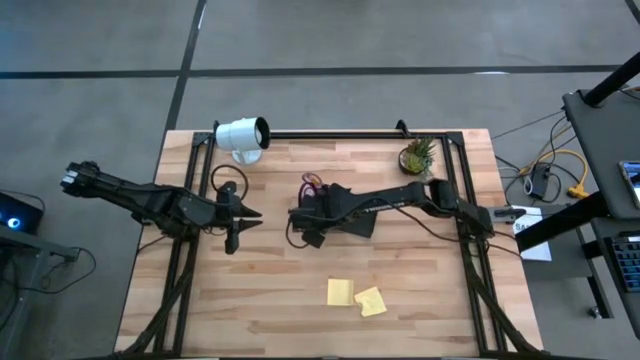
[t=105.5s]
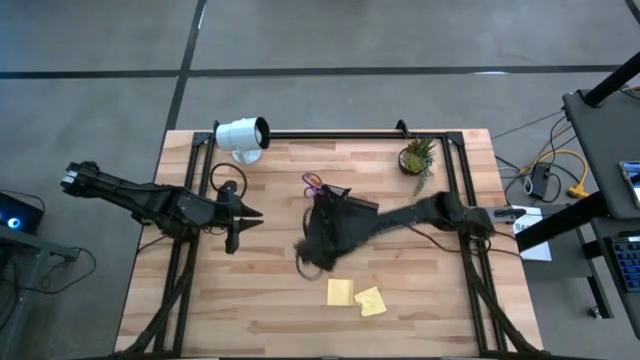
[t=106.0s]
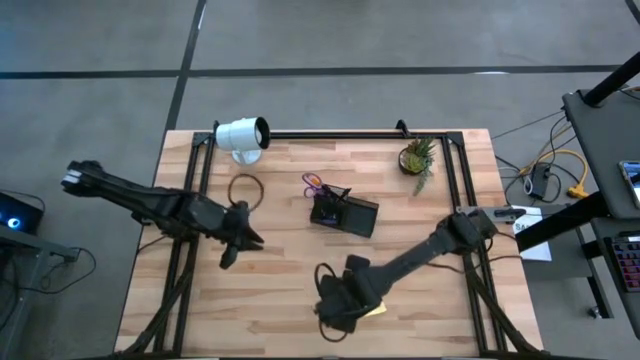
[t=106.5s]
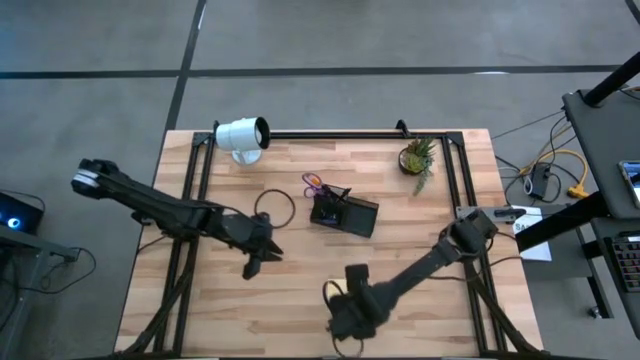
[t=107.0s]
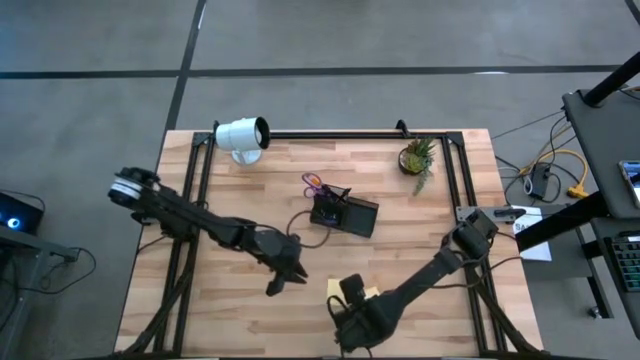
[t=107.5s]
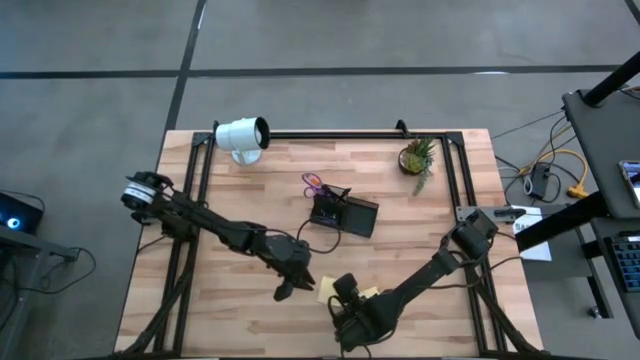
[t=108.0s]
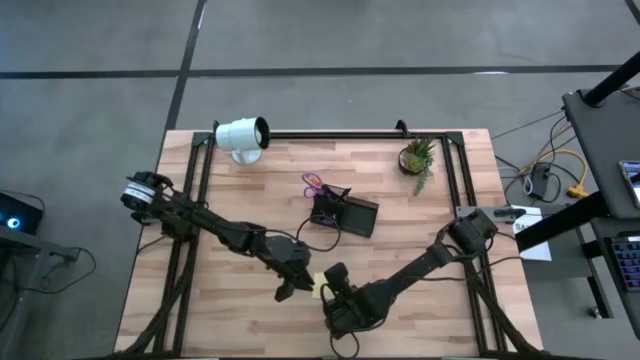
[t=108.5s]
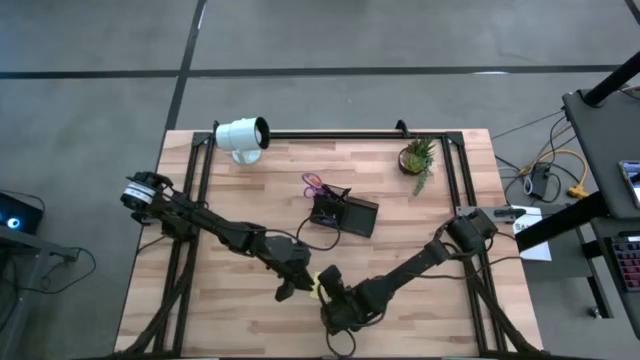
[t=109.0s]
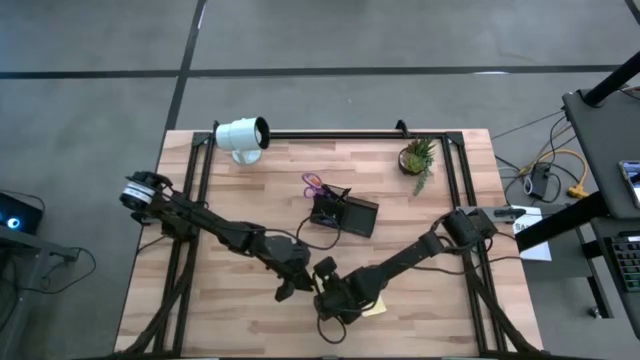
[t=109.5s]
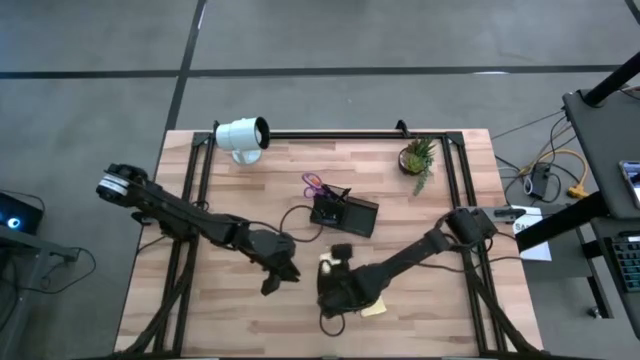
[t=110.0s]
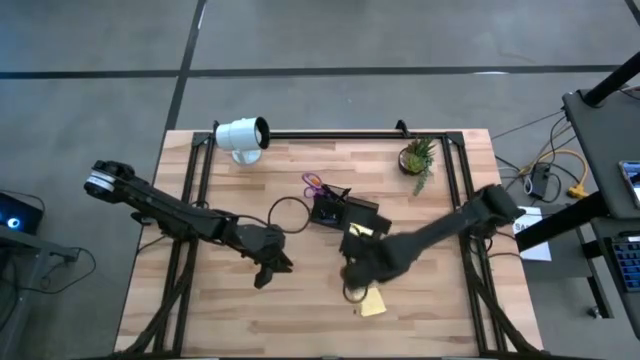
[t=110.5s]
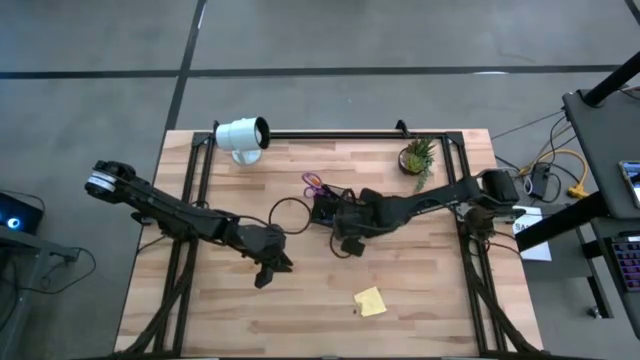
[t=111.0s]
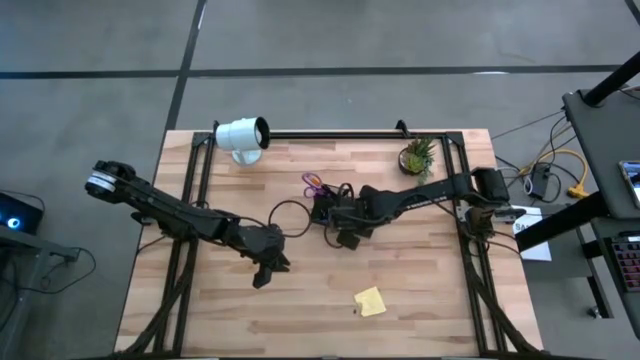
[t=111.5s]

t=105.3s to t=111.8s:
Task: Pick and place office supplies into organizer
Put the left yellow sticky notes into the black desk organizer

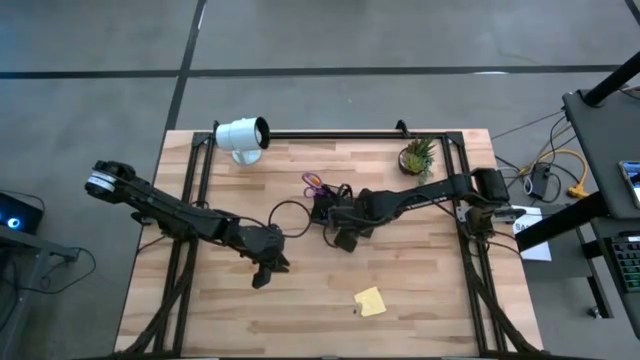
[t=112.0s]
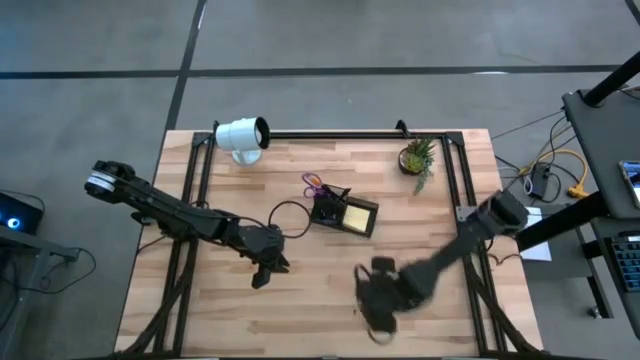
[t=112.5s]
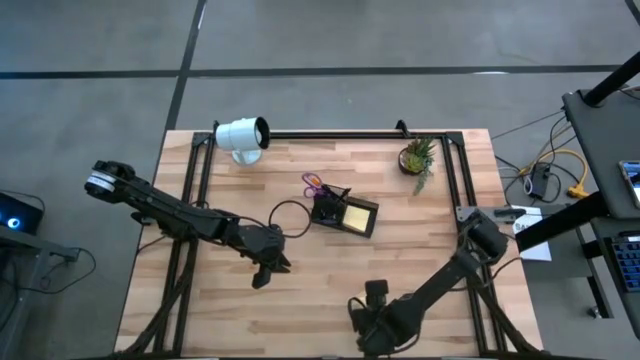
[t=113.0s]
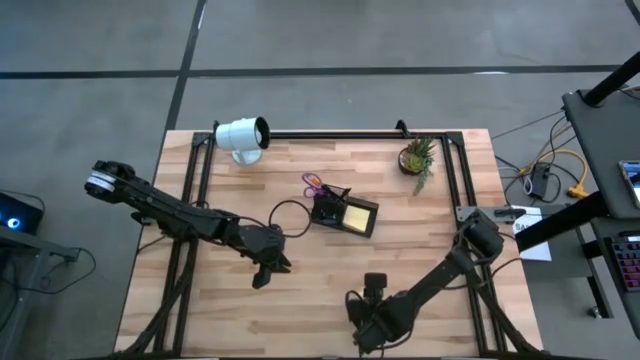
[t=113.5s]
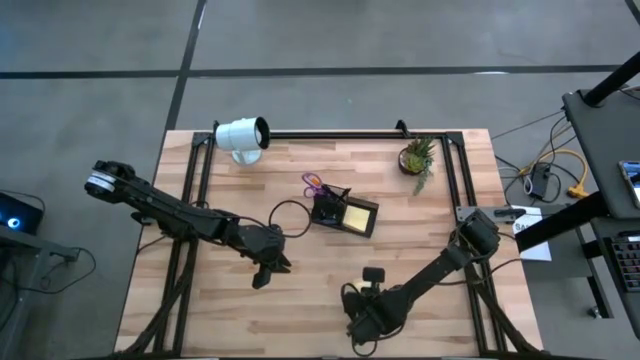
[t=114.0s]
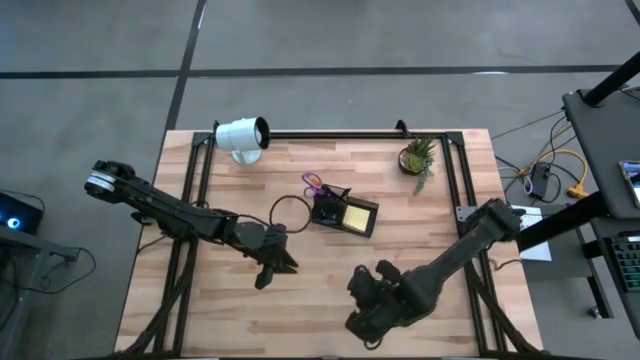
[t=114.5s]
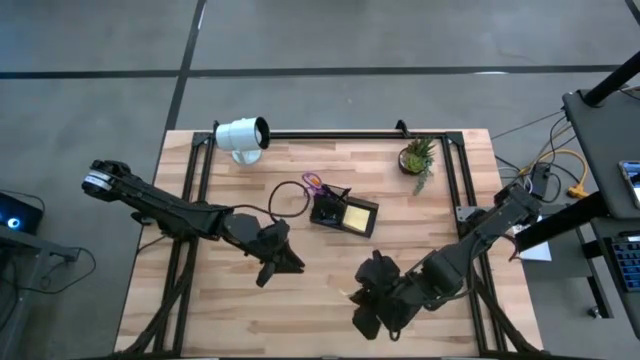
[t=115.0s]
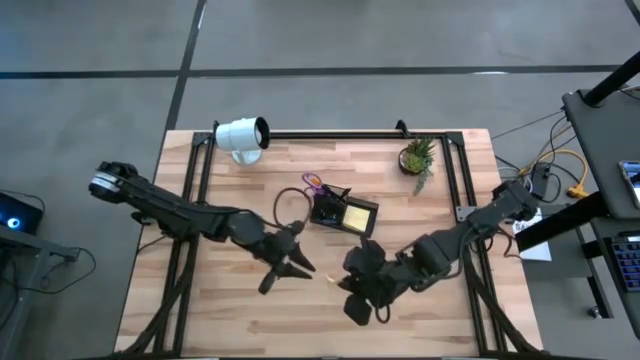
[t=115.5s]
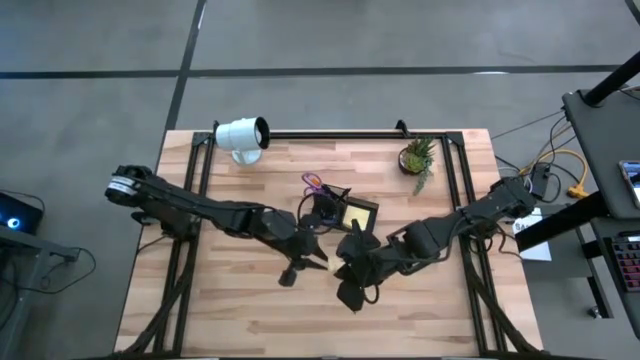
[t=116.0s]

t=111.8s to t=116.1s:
Put the yellow sticky notes into the black desk organizer

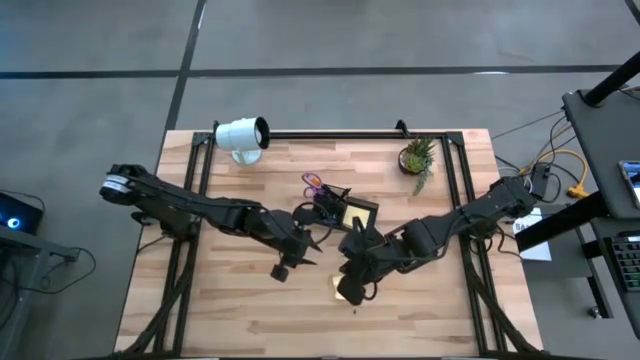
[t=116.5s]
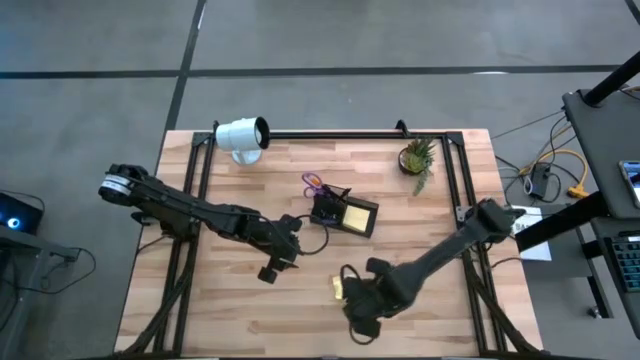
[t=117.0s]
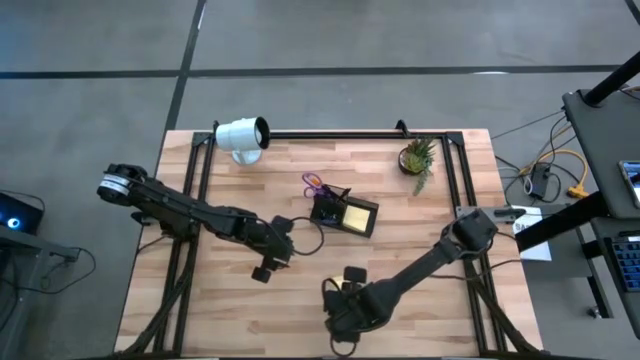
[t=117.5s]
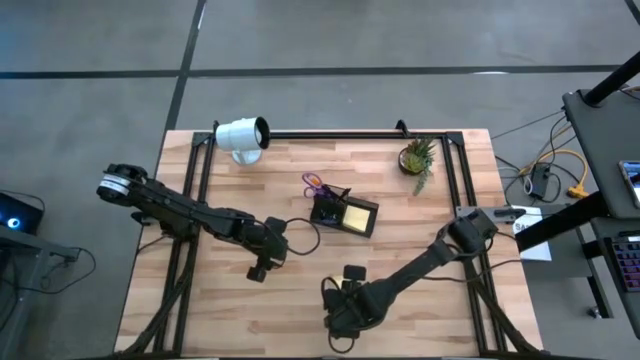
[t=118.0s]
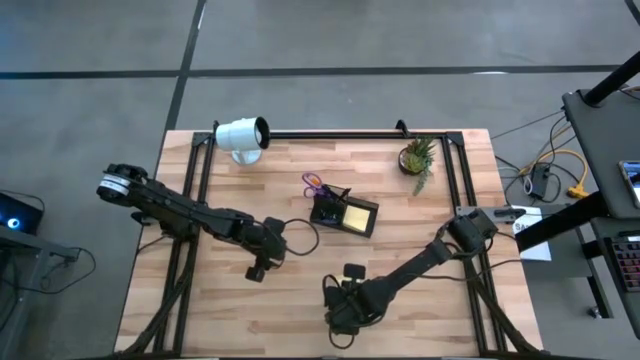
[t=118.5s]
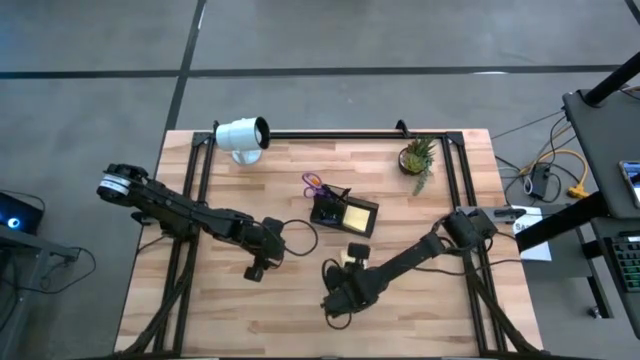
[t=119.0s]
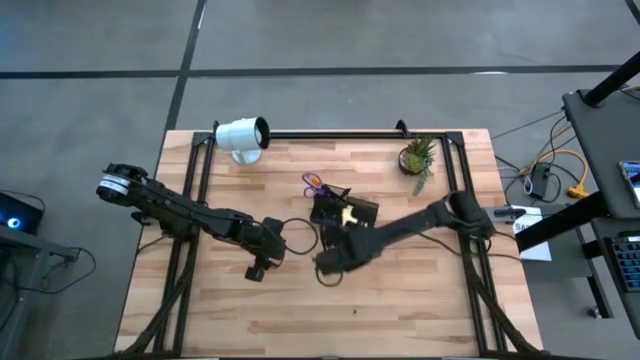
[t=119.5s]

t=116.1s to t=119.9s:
Put the yellow sticky notes into the black desk organizer

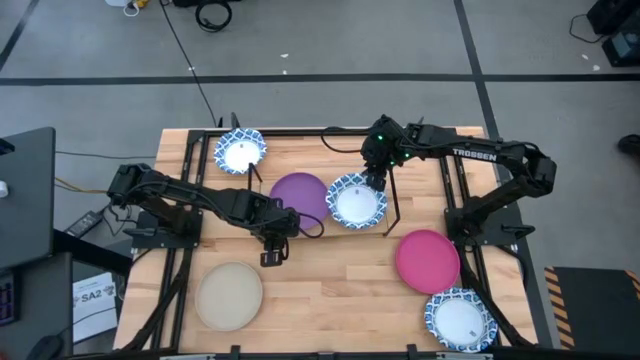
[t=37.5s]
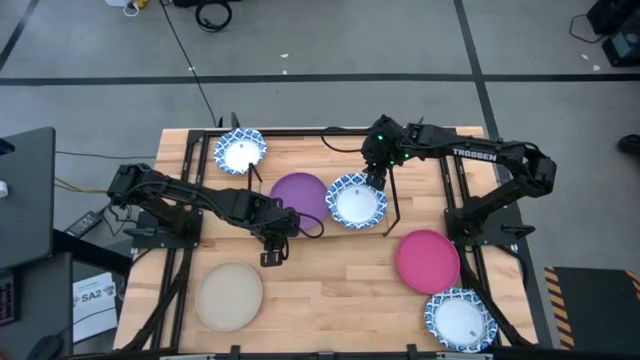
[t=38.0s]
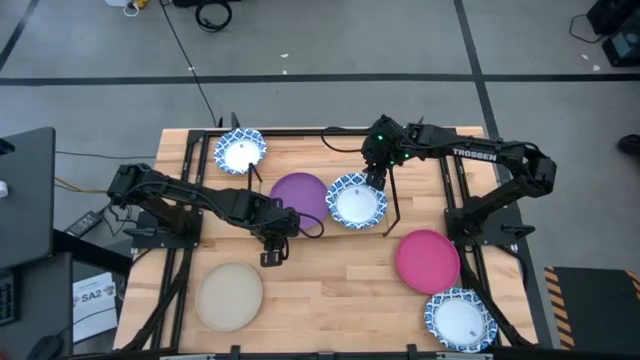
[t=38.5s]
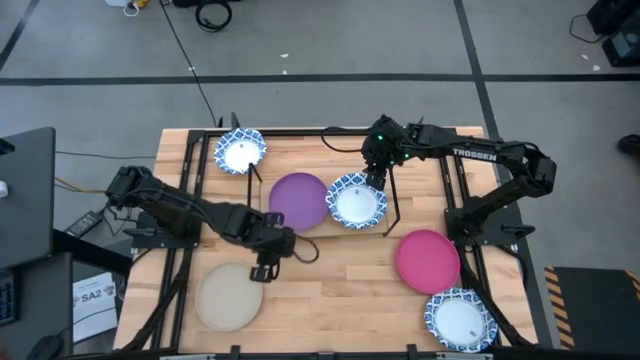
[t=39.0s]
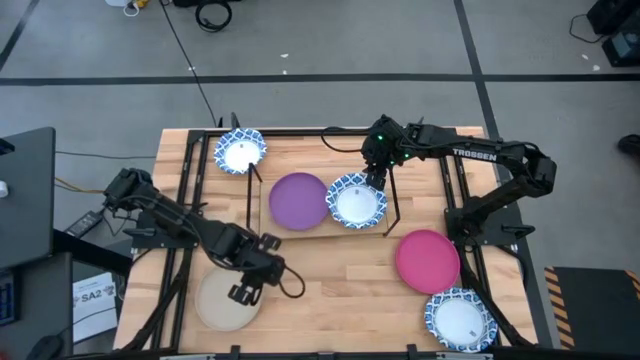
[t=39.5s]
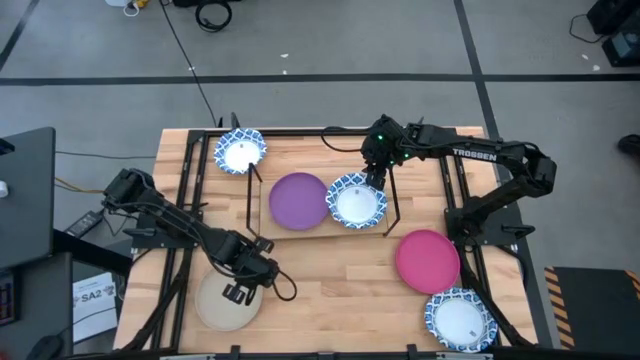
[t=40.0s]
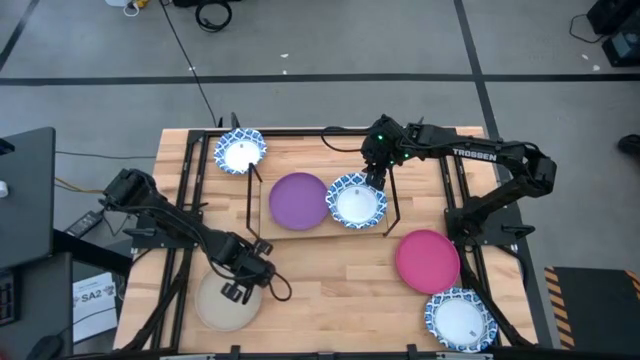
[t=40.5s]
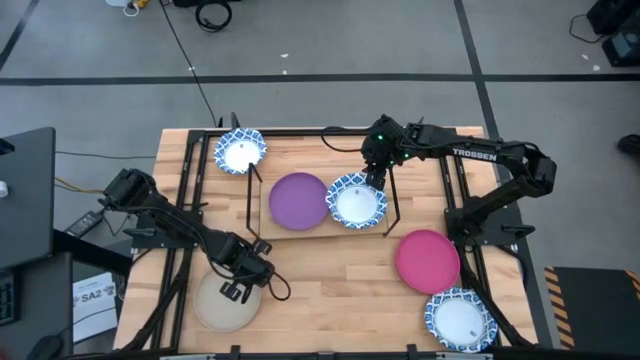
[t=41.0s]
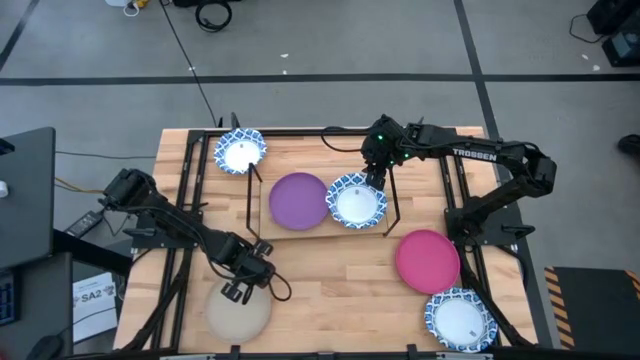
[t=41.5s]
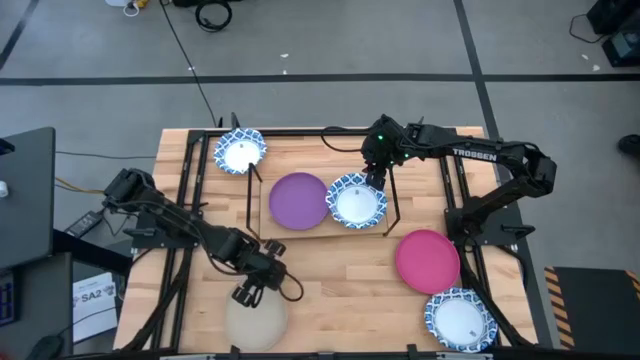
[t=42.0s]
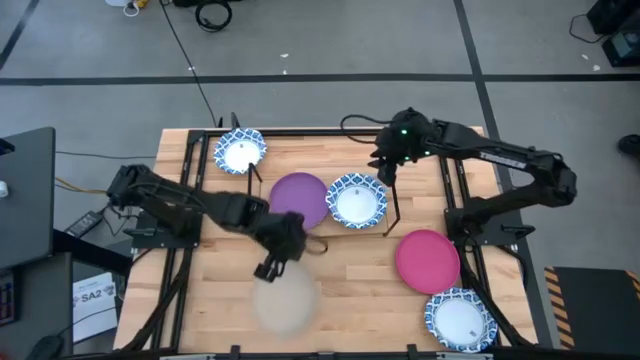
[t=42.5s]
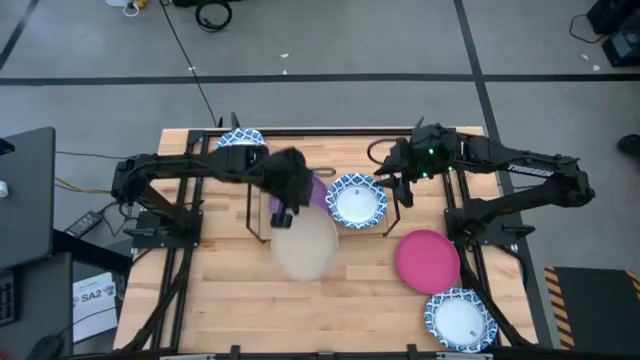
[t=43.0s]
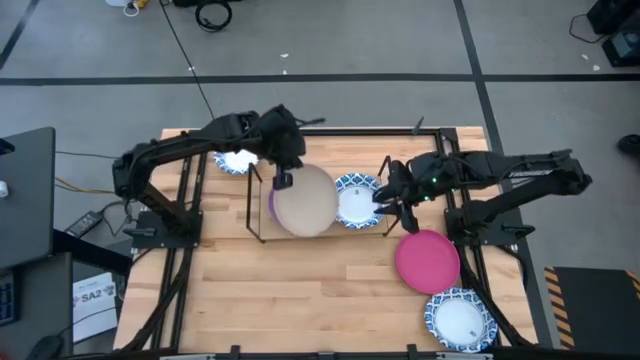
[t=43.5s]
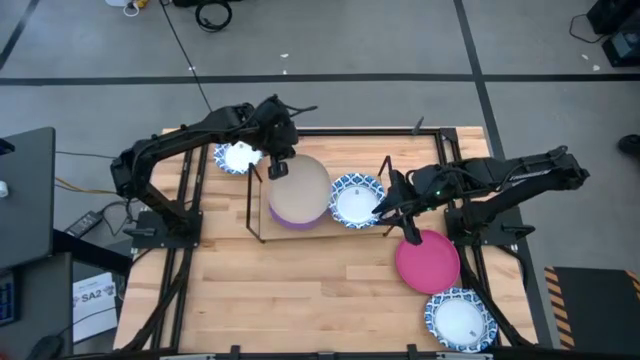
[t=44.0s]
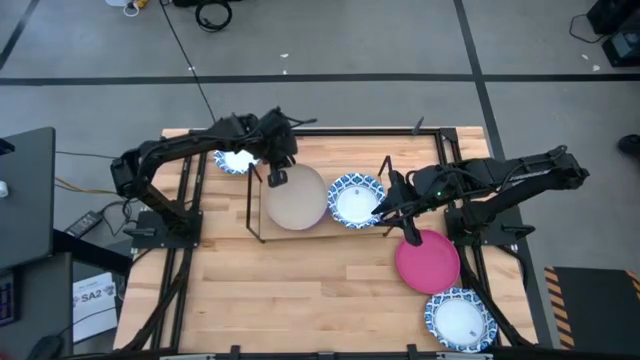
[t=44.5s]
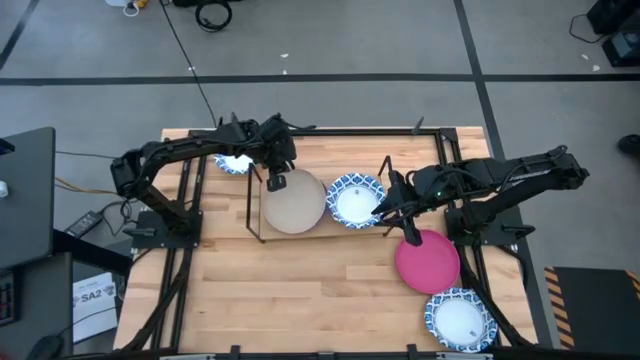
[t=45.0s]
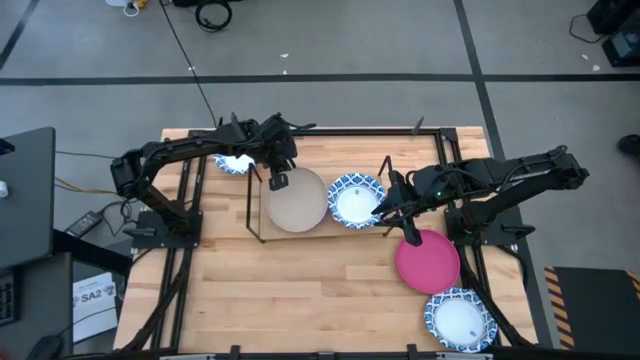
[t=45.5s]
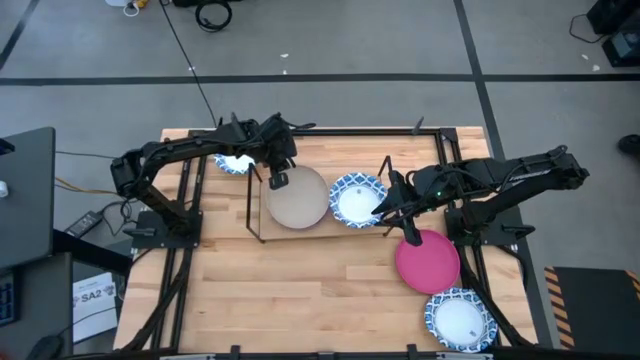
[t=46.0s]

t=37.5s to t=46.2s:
Task: Place and stack plates onto a shelf
Stack the gray plate on top of the purple plate on the shelf
